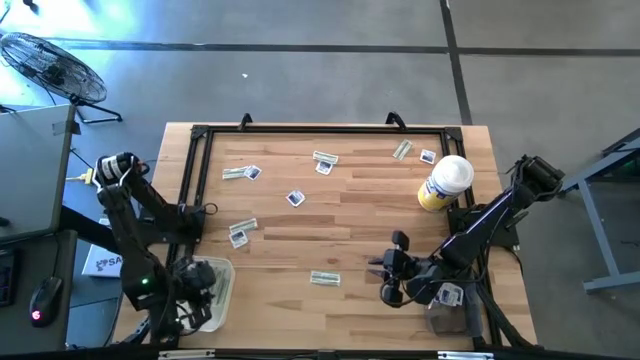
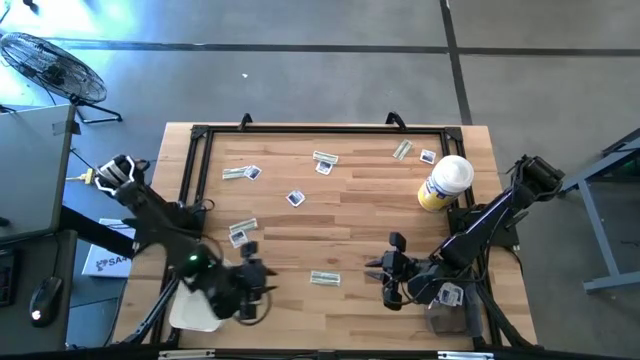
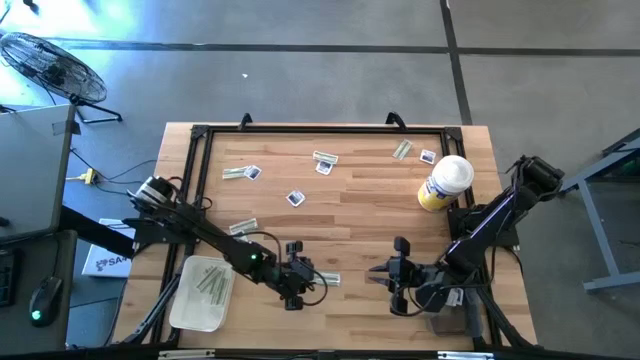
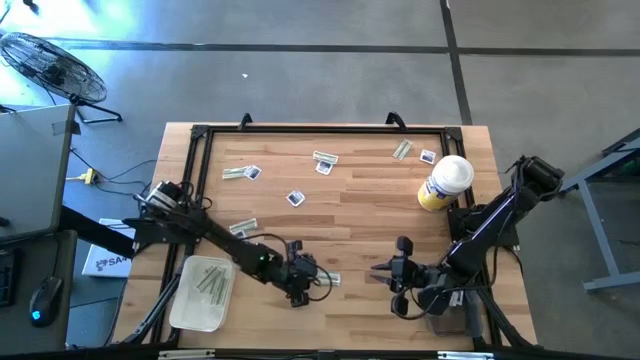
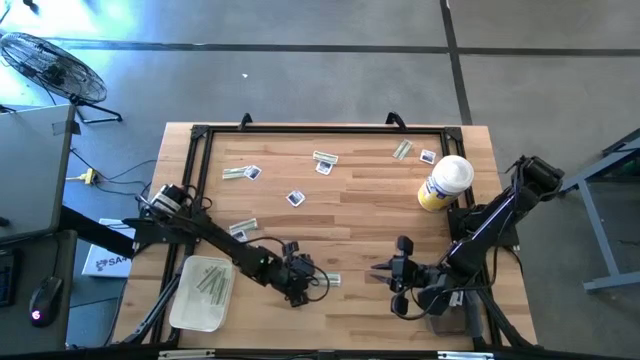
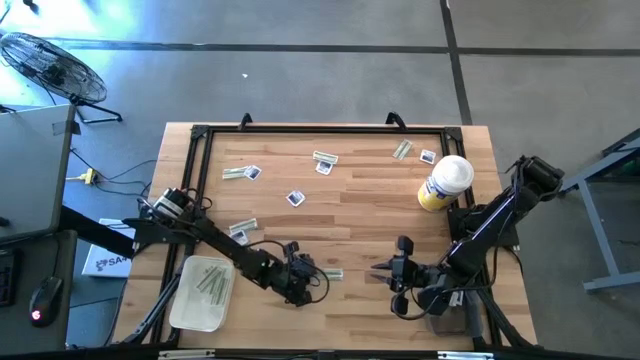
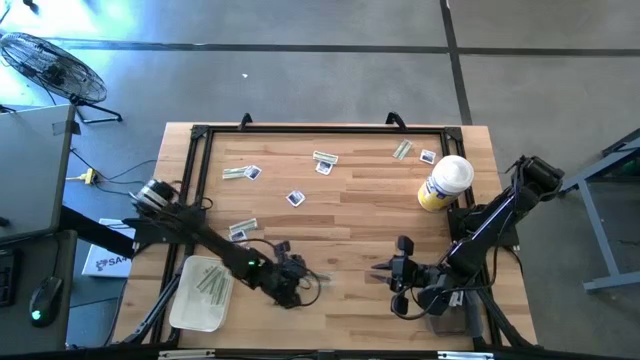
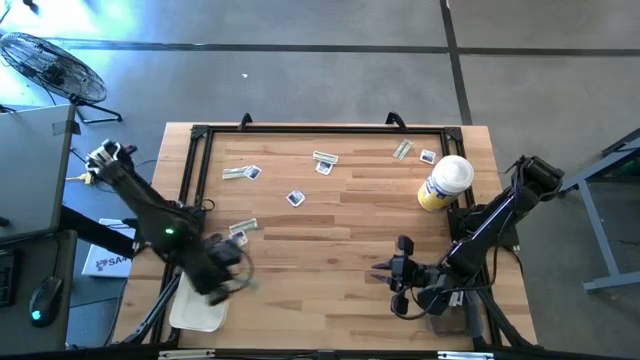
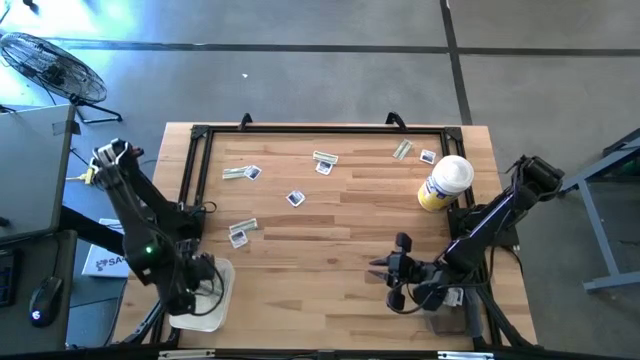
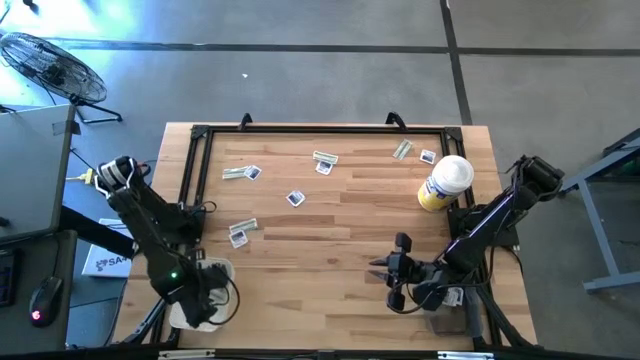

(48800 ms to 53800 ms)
Task: Pick & Place First Aid Supplies
Put the green bandage into the white bin

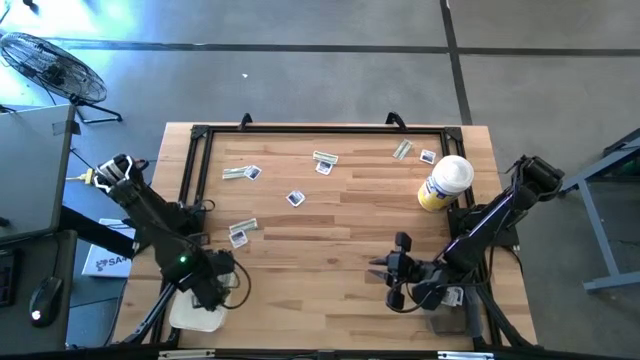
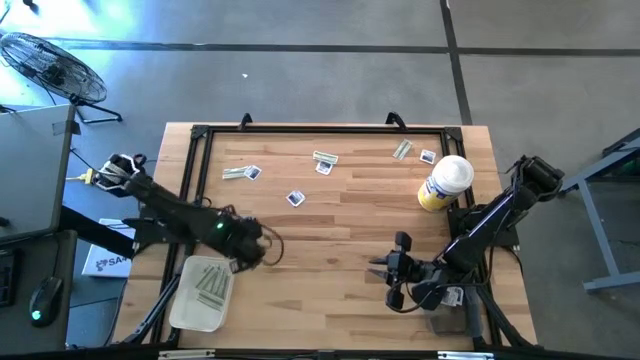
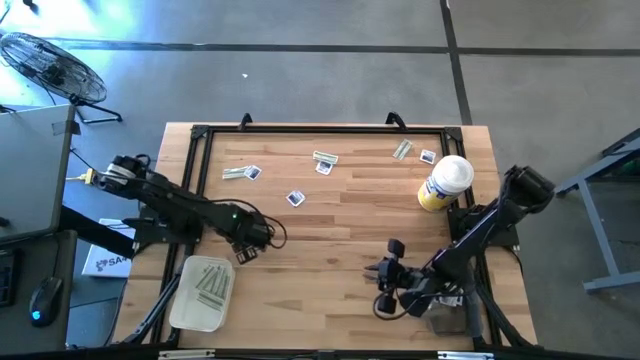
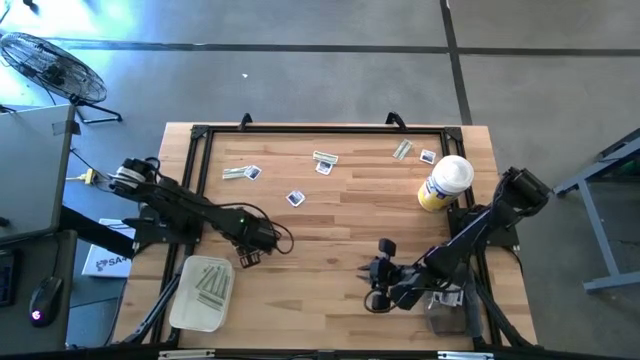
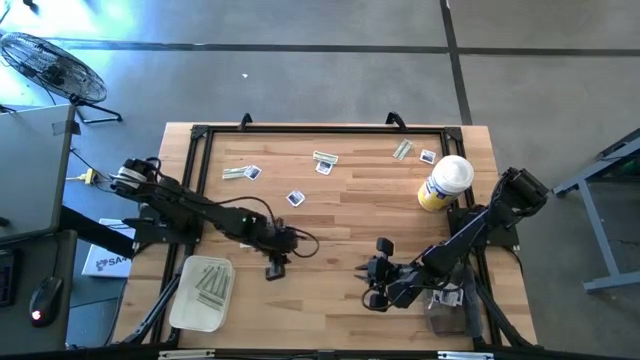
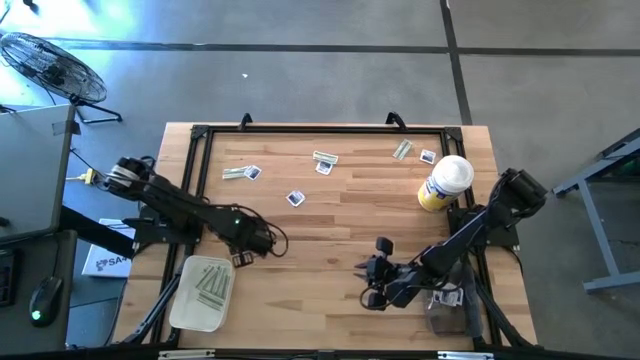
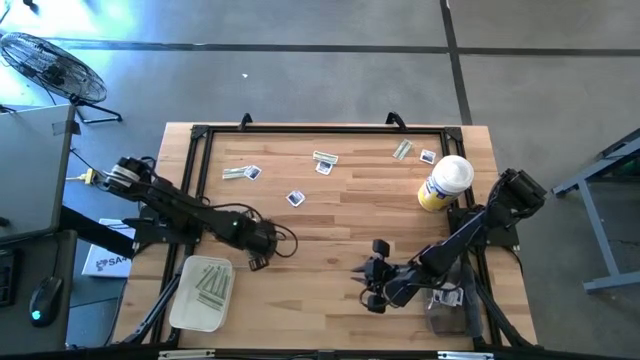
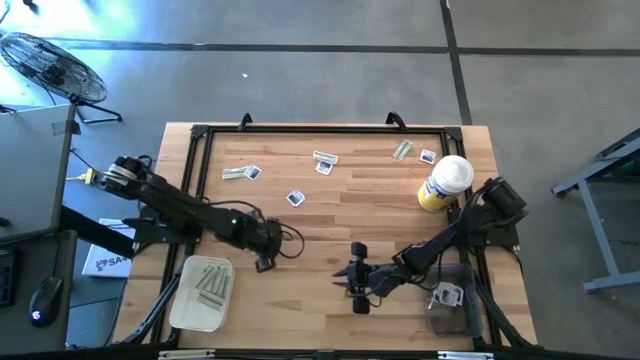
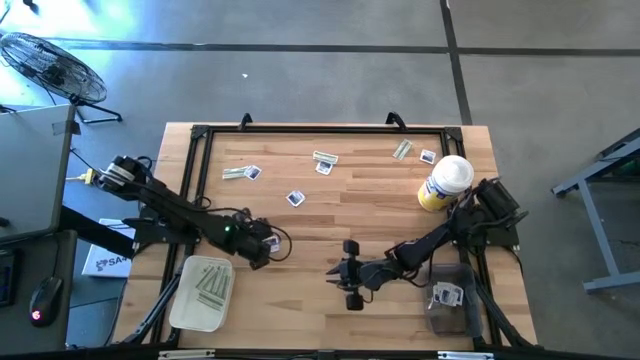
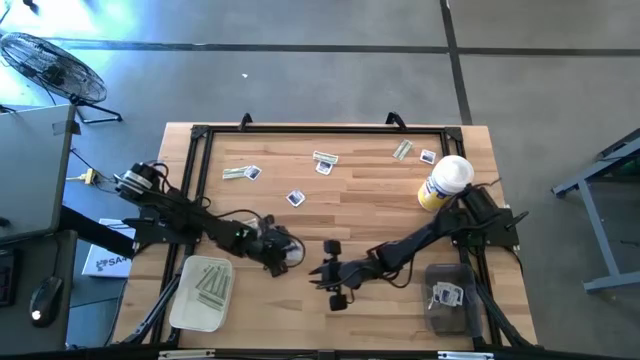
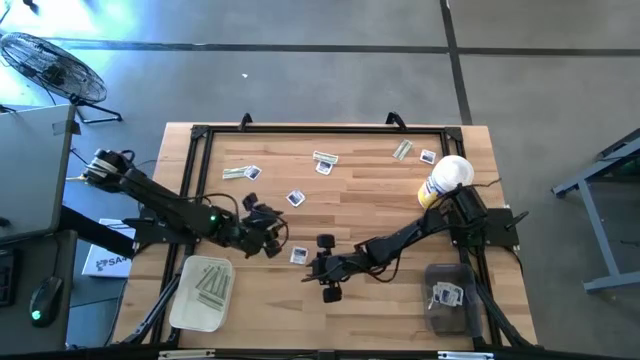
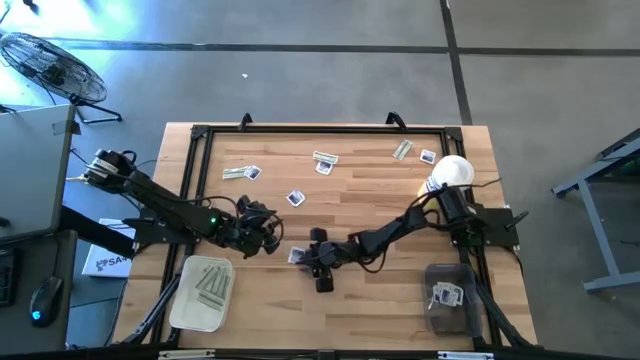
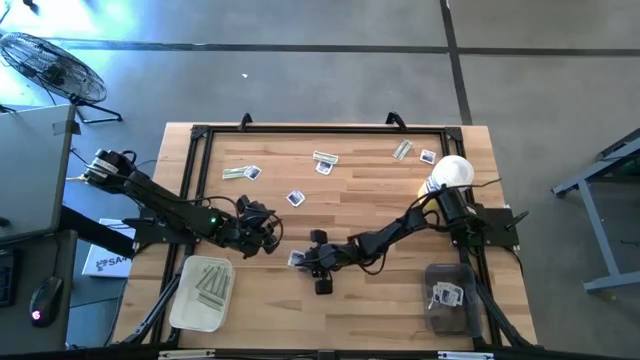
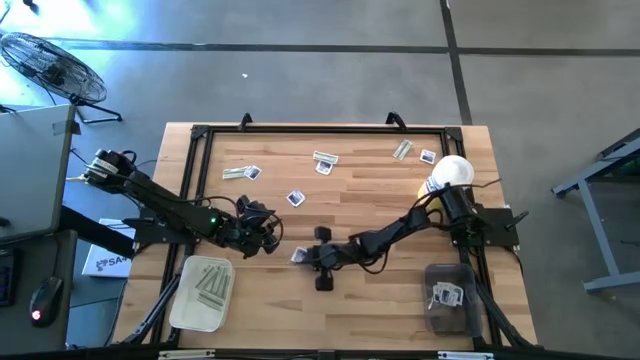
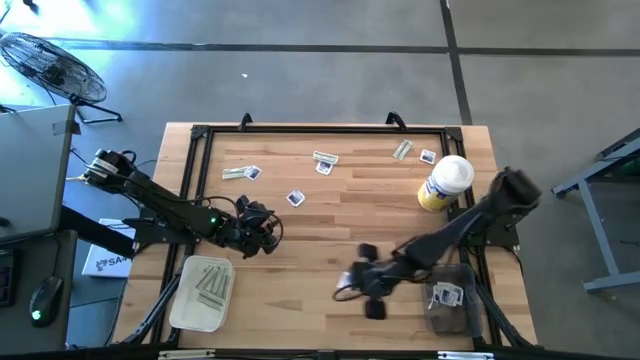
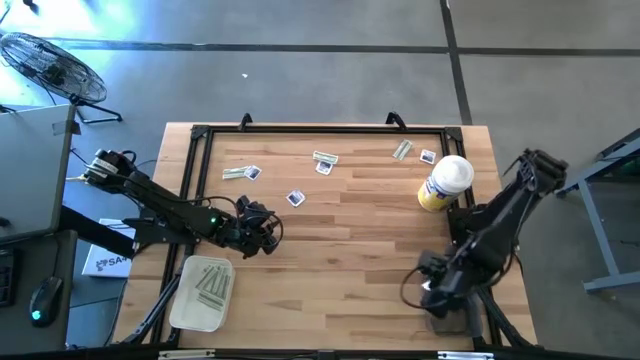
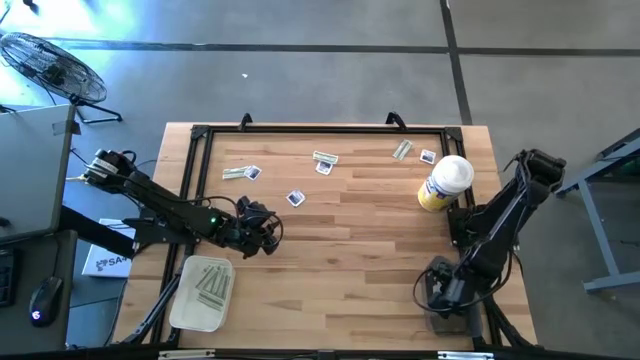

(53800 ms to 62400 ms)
Put the blue alcohol pad into the black bin

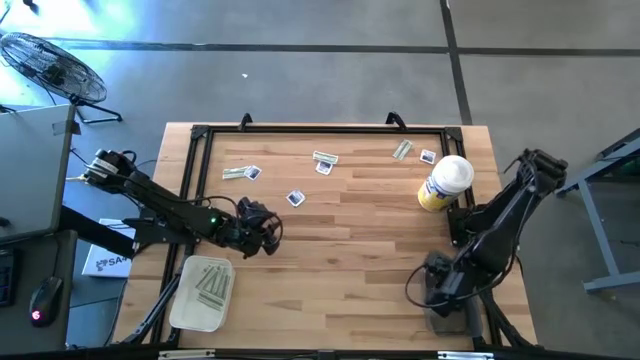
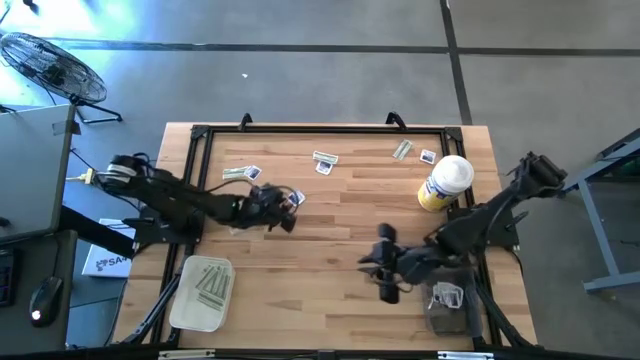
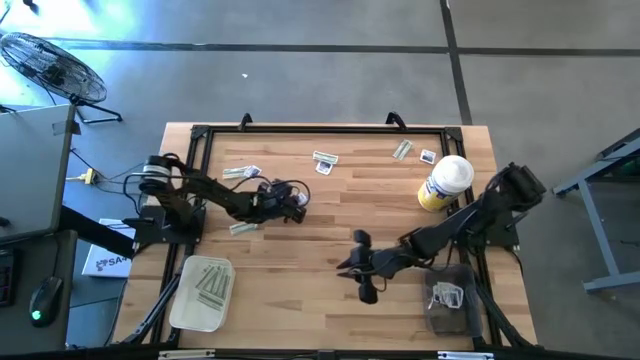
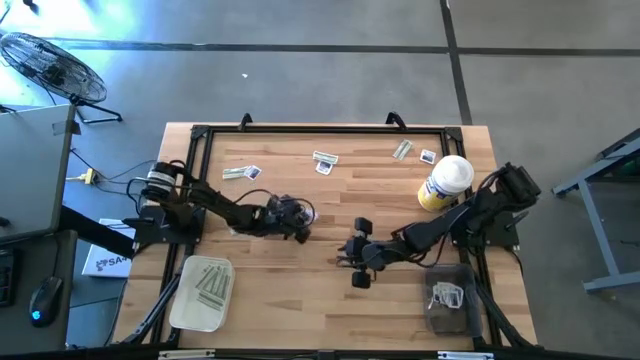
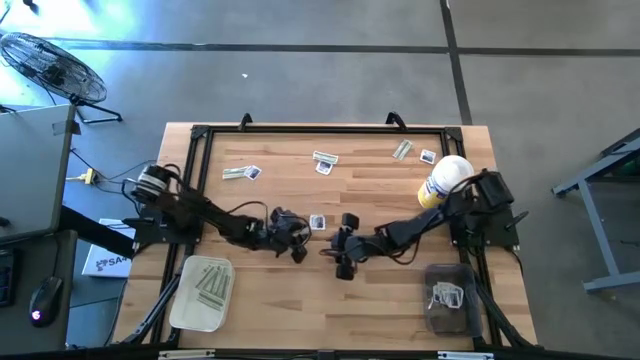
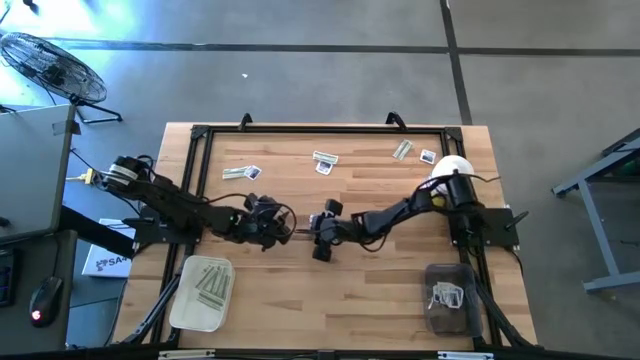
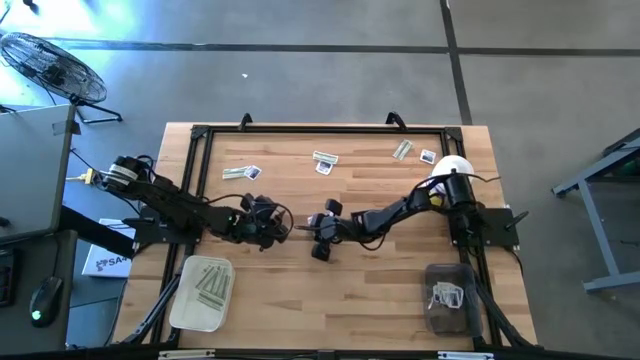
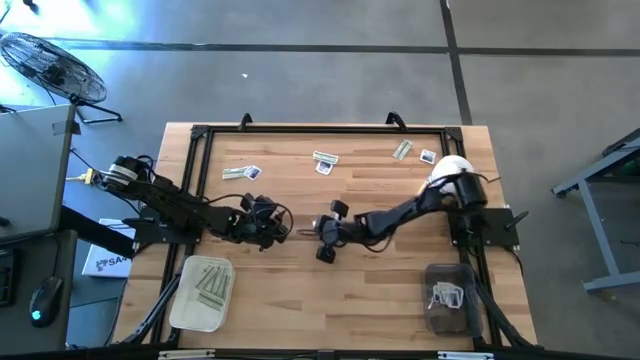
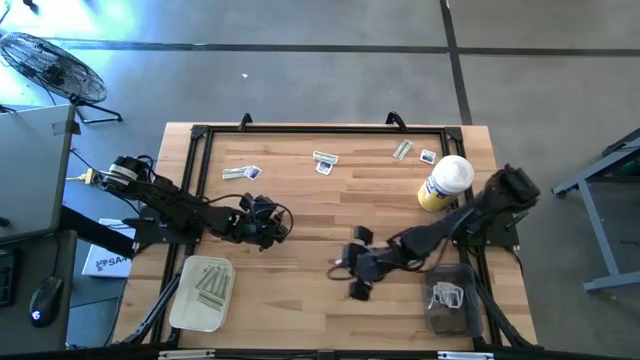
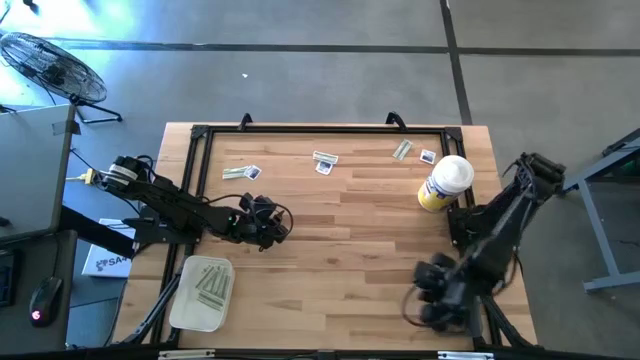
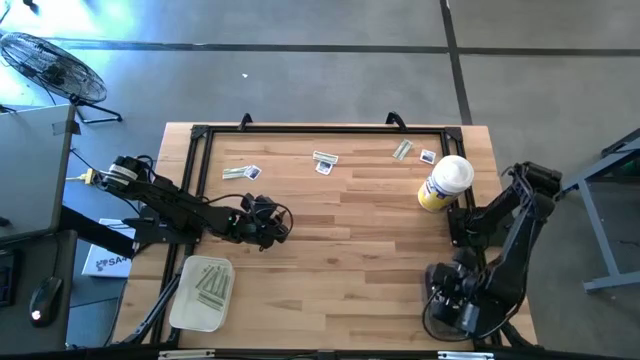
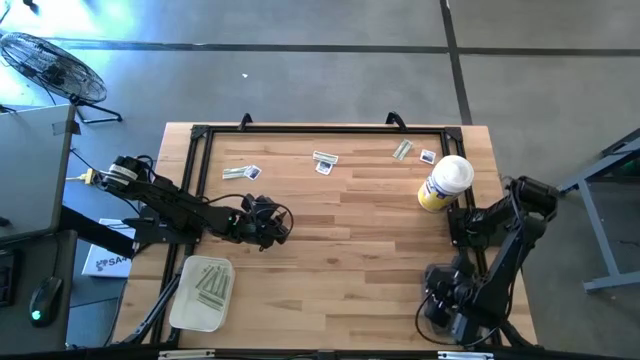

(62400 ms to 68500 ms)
Put the blue alcohol pad into the black bin

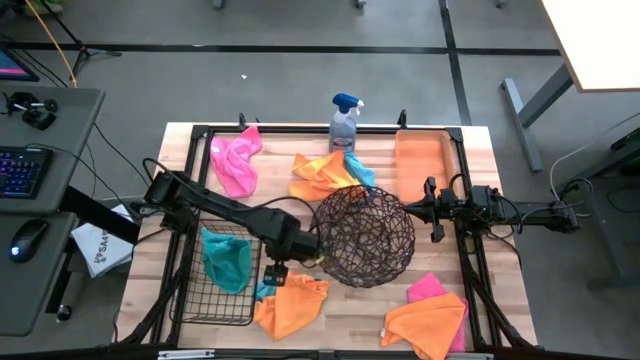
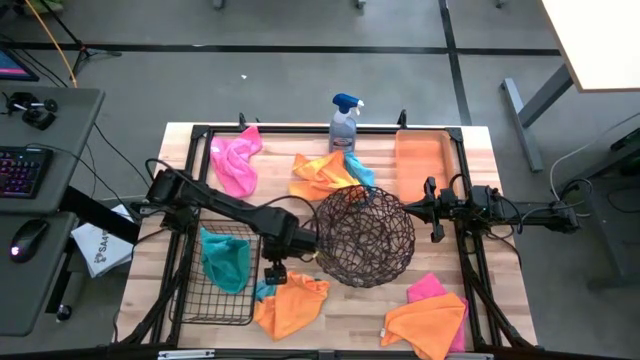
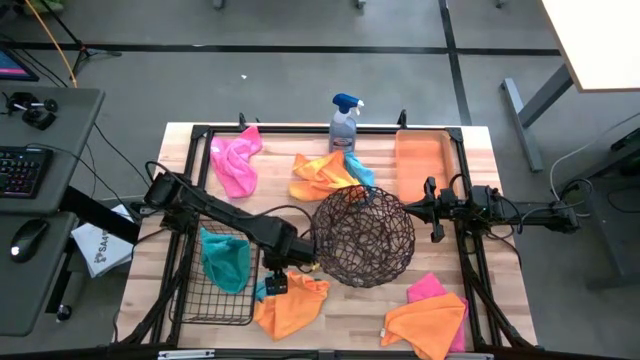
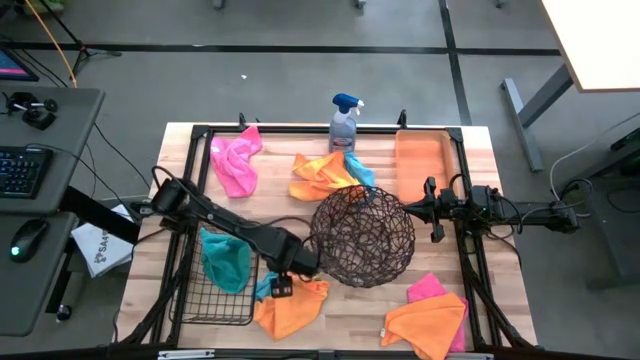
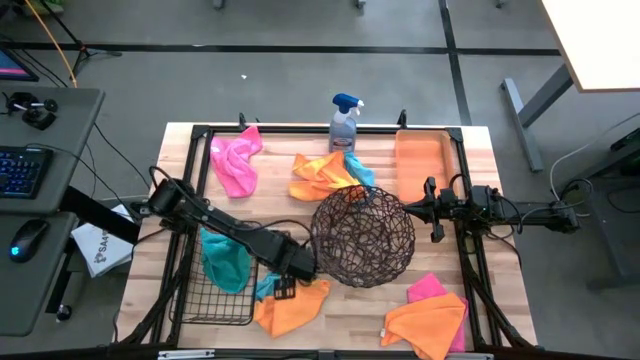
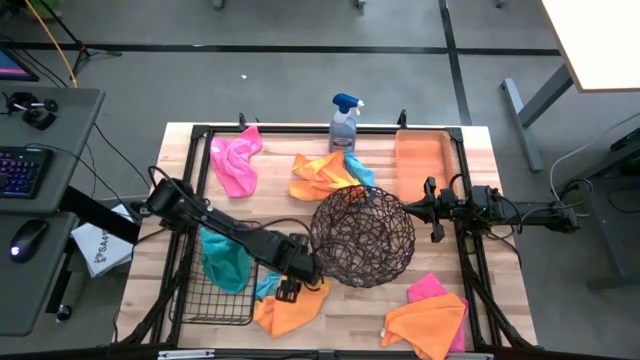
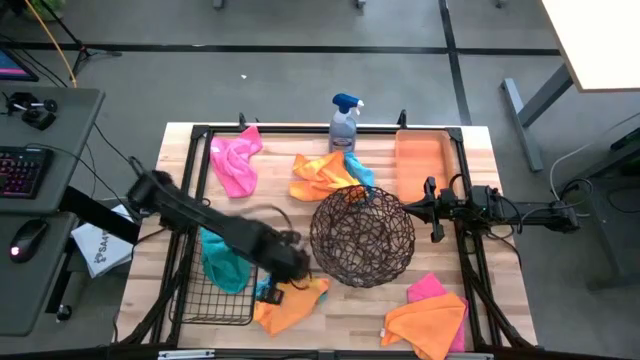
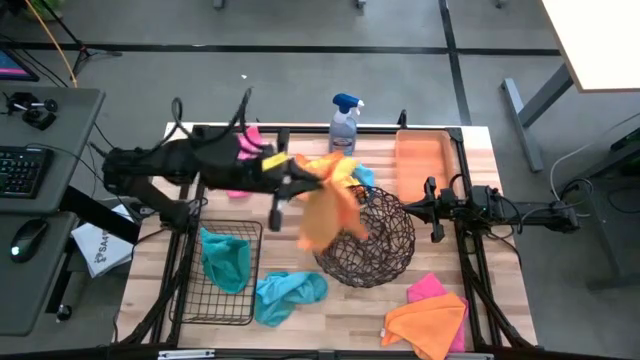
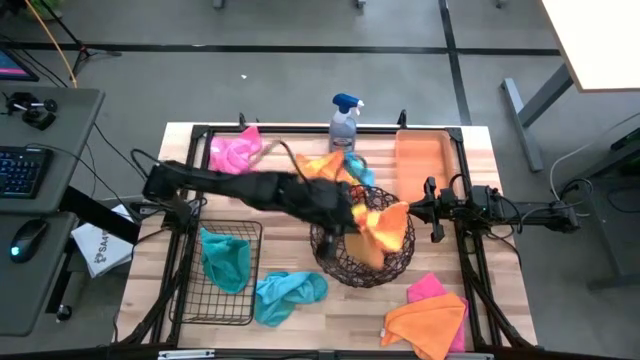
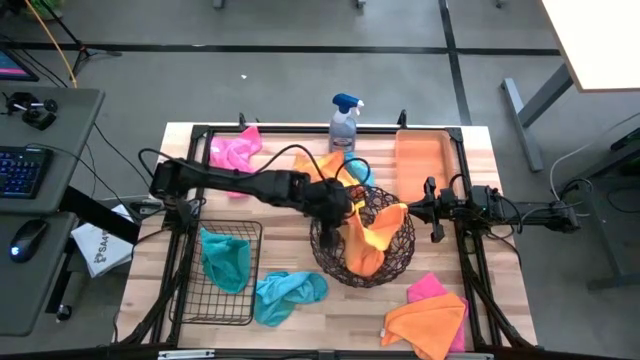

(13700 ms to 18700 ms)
Task: Sort microfiber towel by color & place in baskets
Put the bottom left orange microfiber towel into the wire basket
